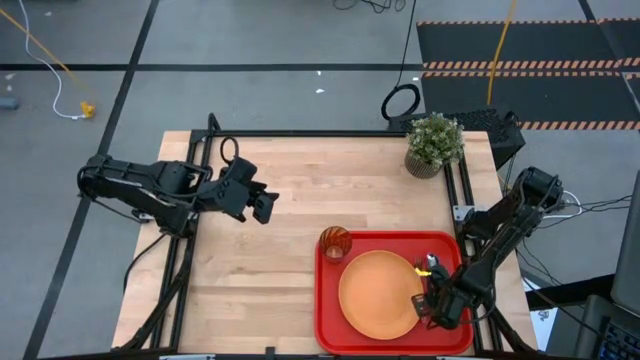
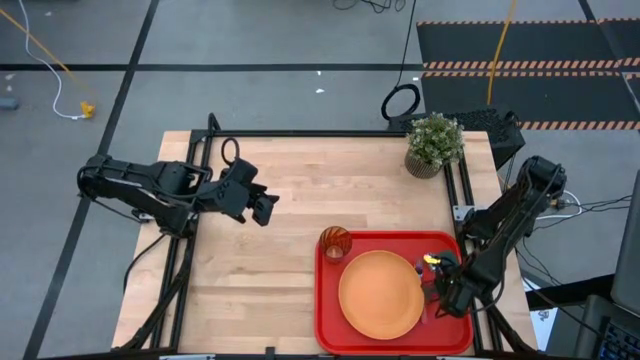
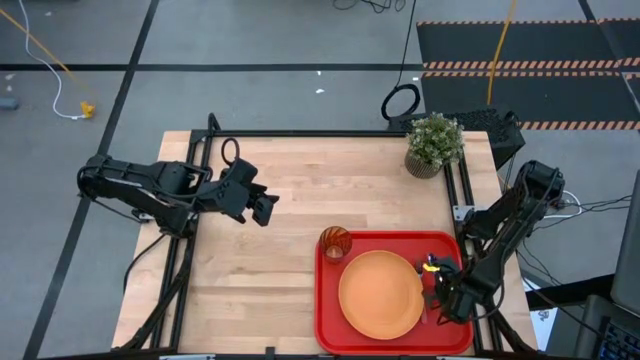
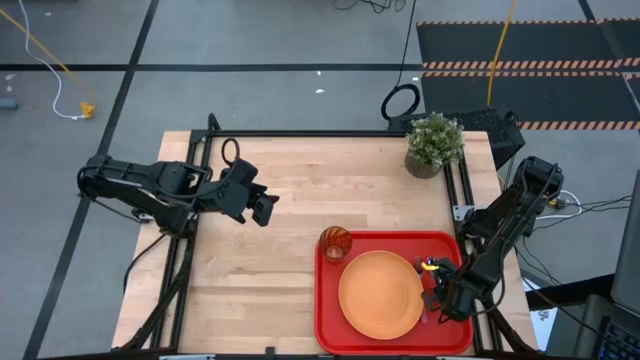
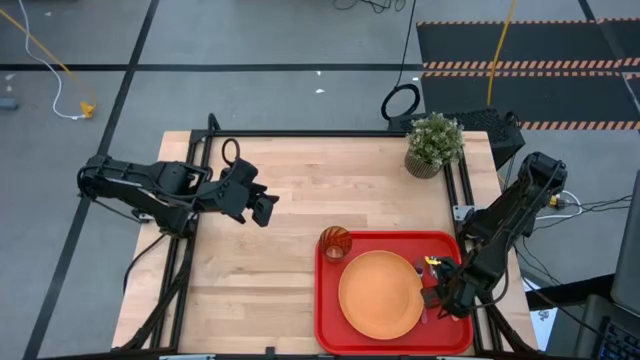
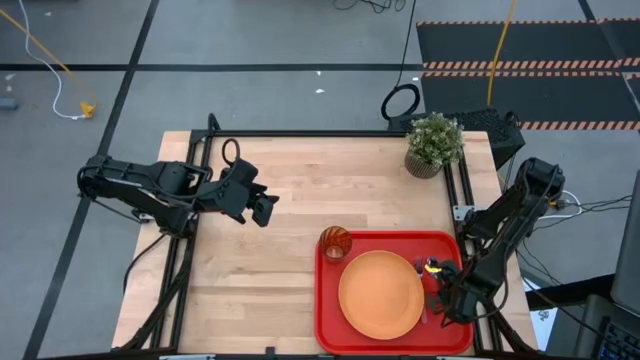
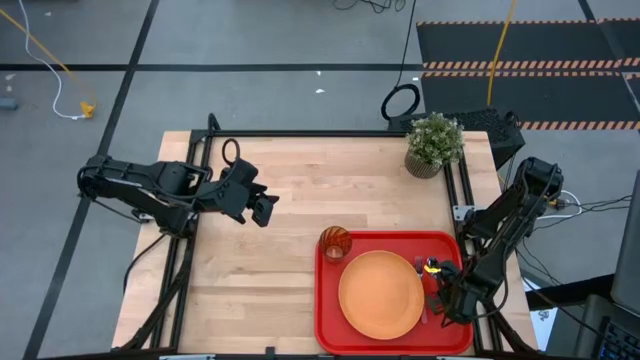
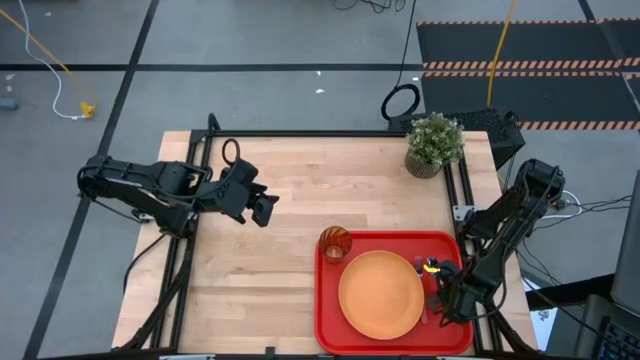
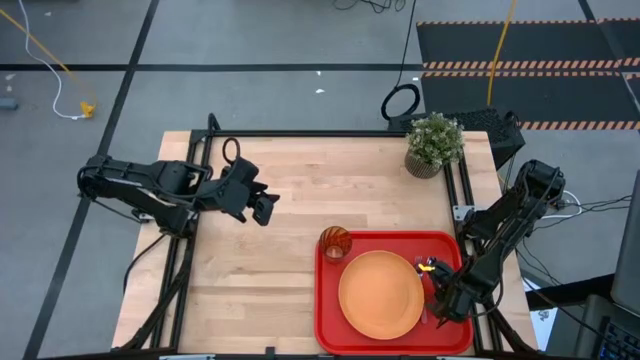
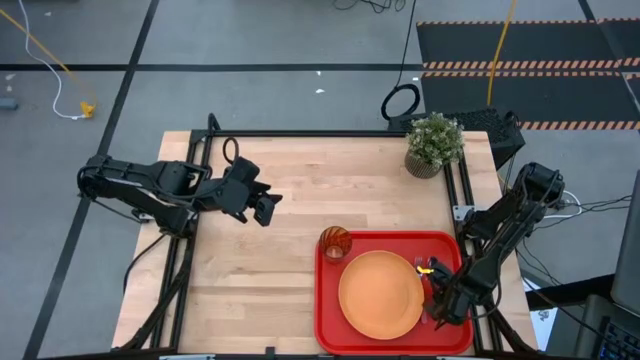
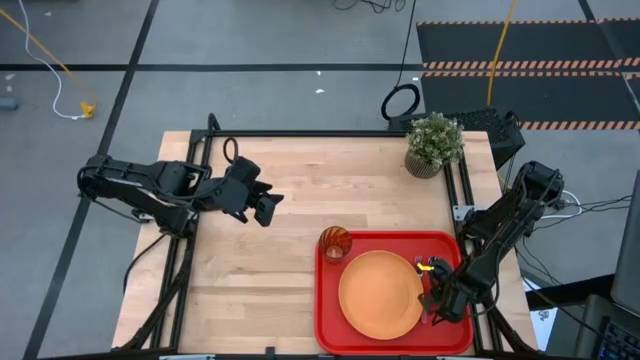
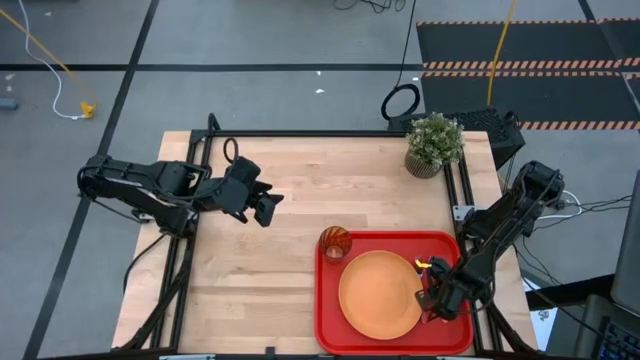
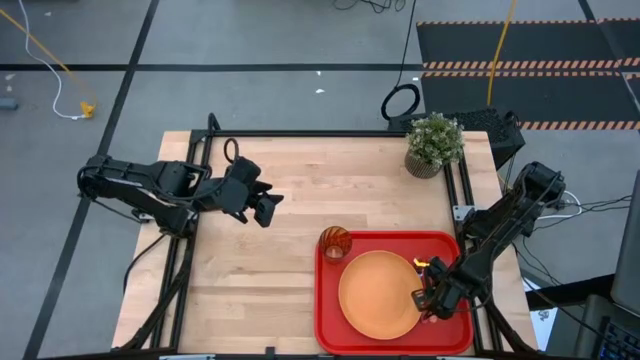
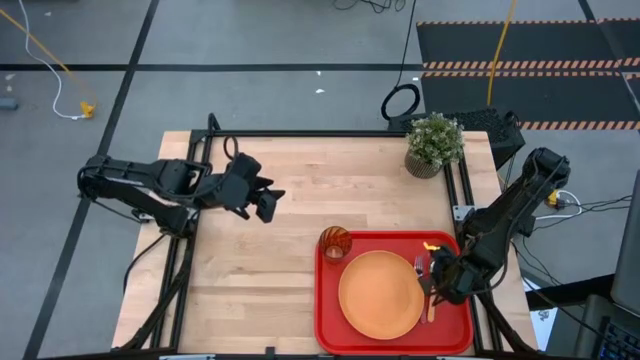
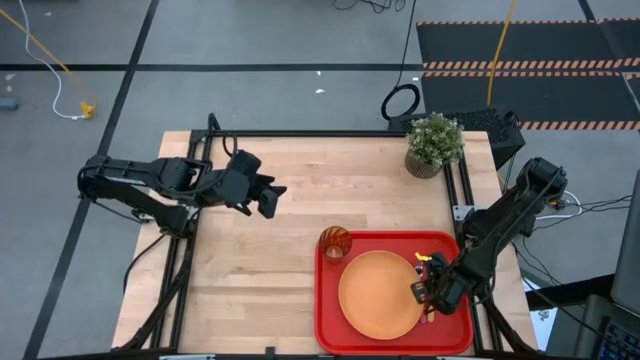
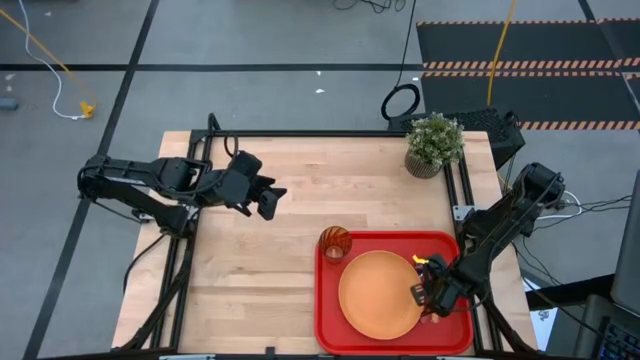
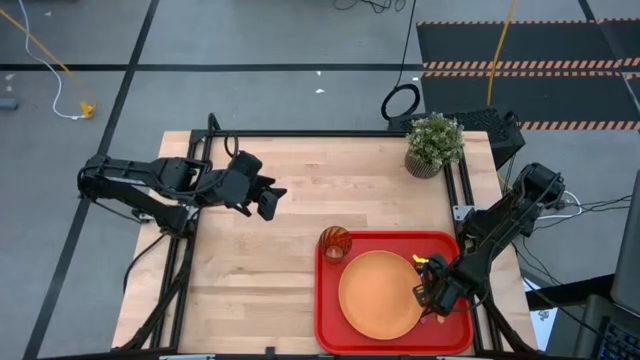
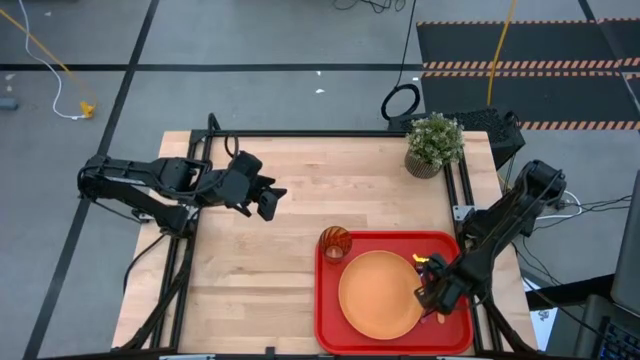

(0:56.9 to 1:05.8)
Task: Pick and place plate/cup/fork/spoon on tray
Put the yellow spoon on the red tray to the right of the red fork

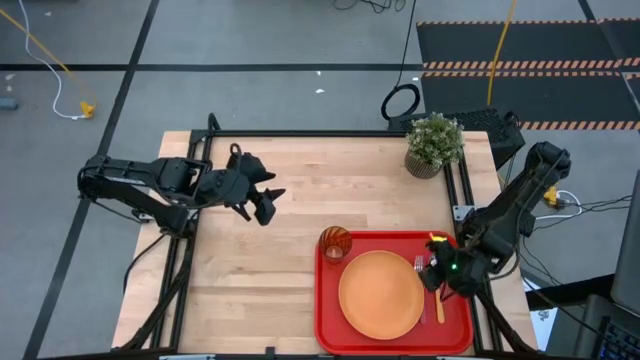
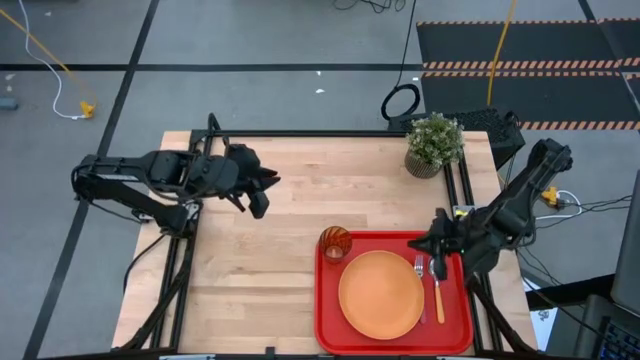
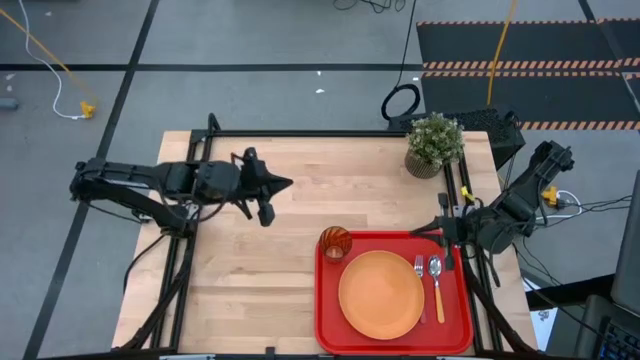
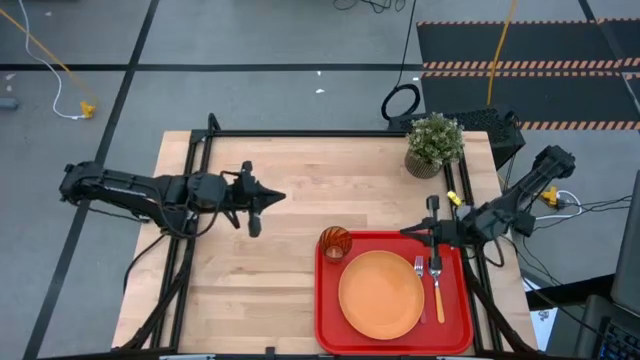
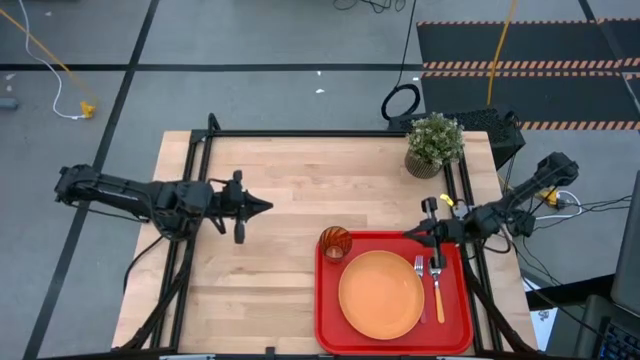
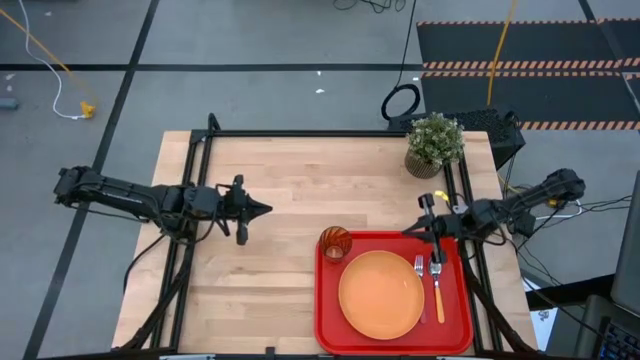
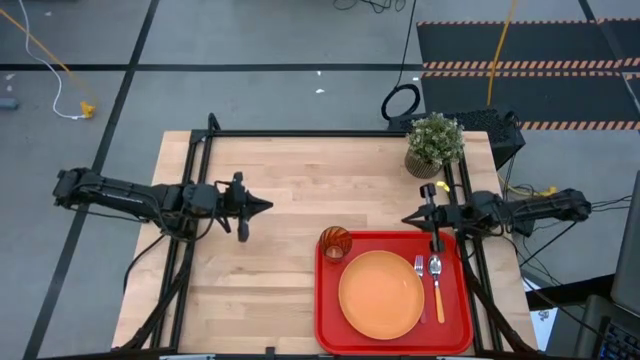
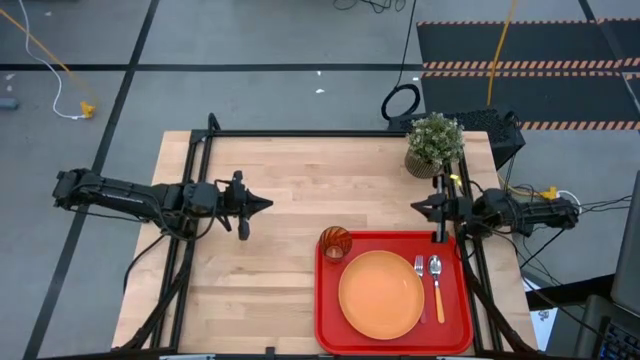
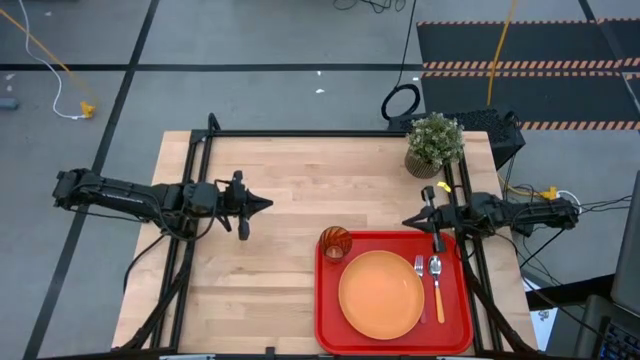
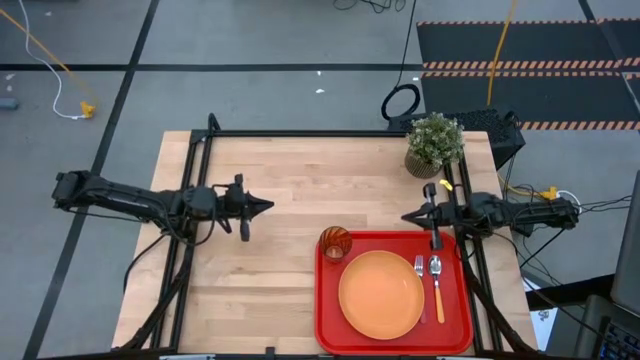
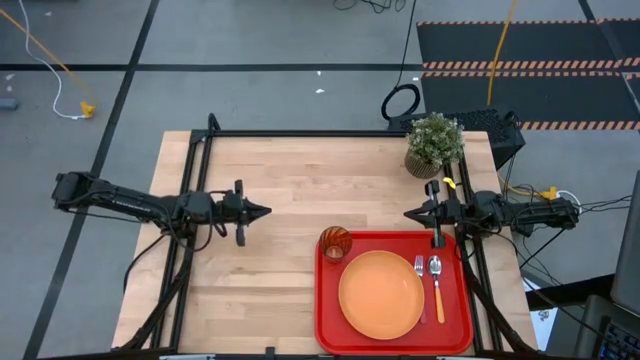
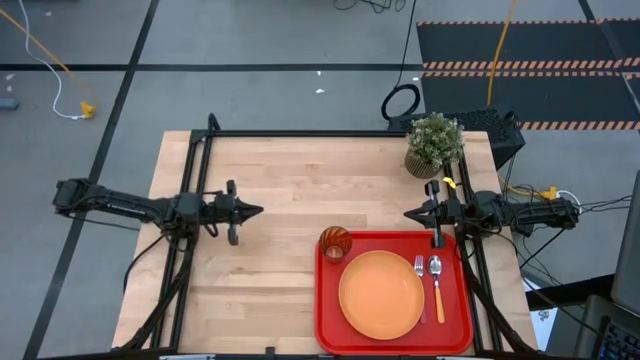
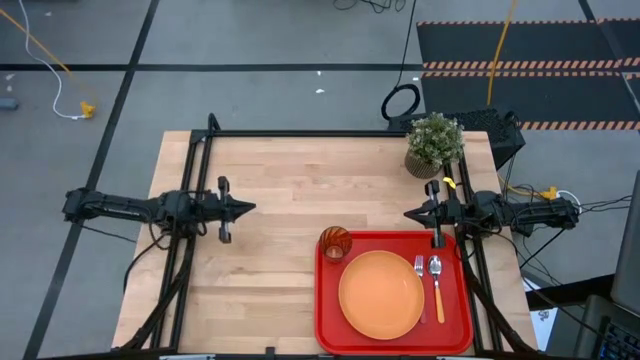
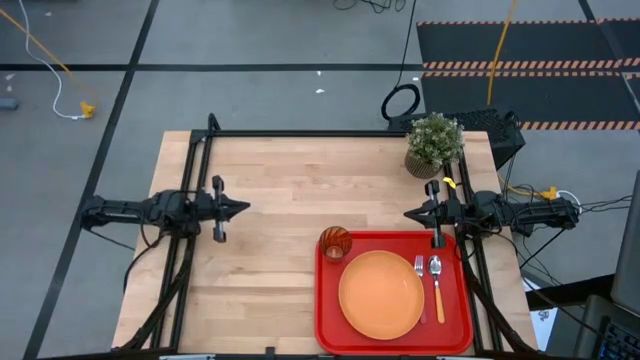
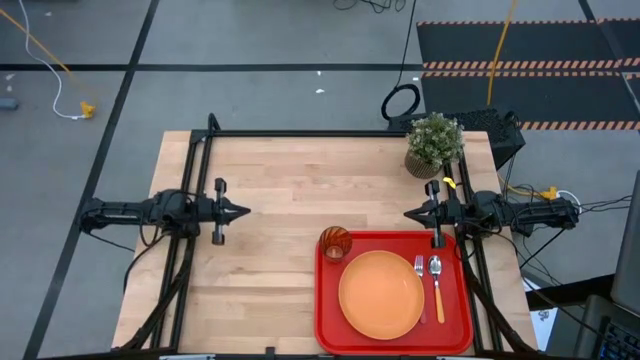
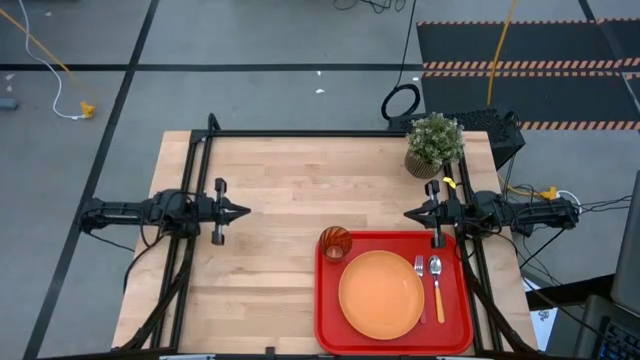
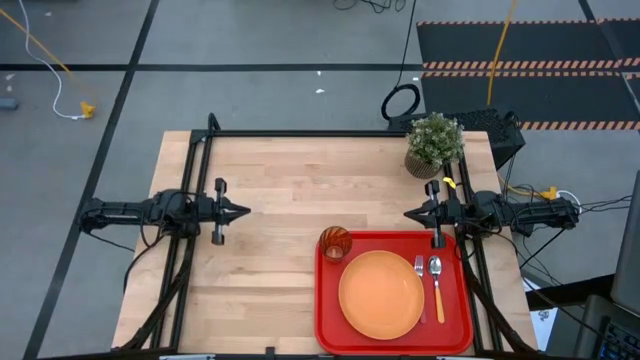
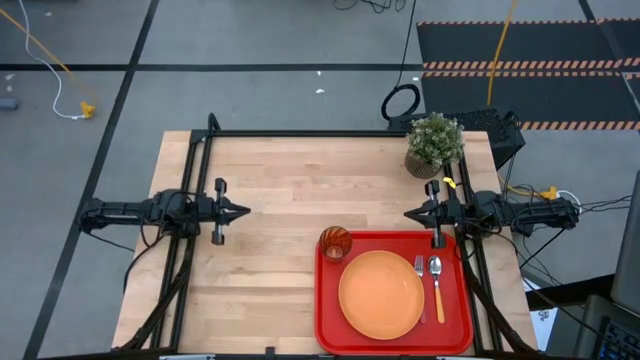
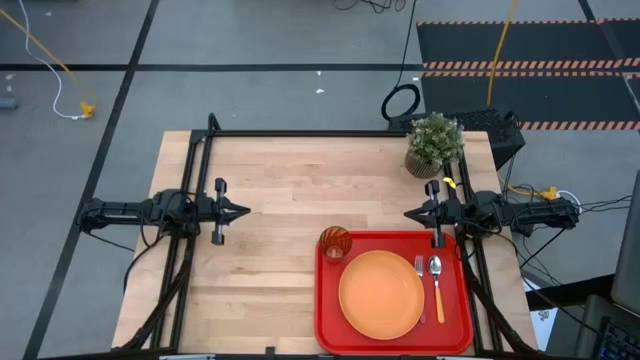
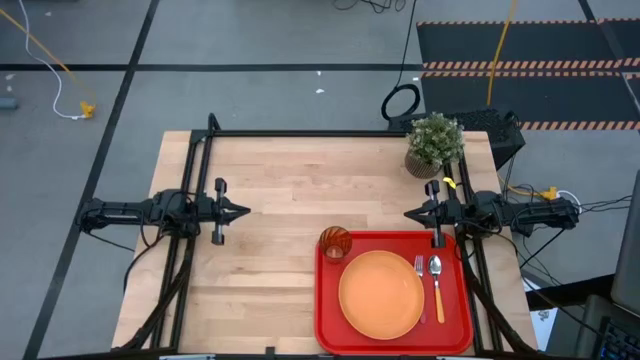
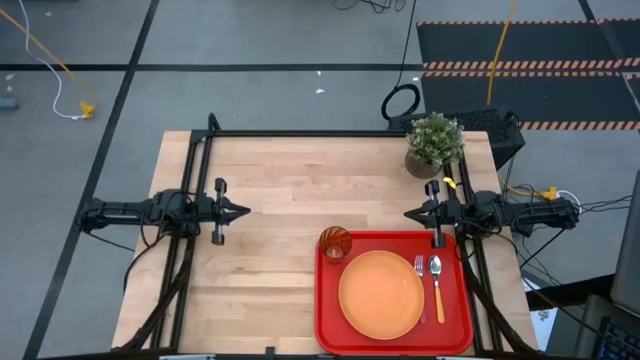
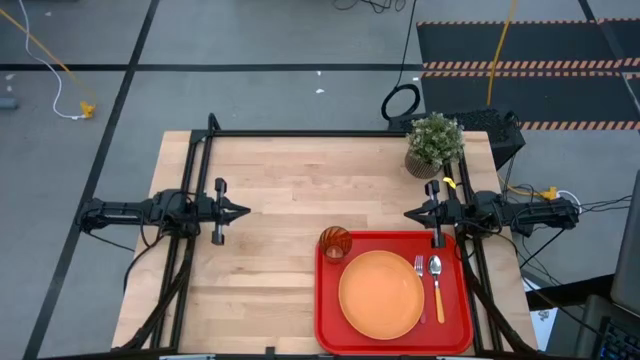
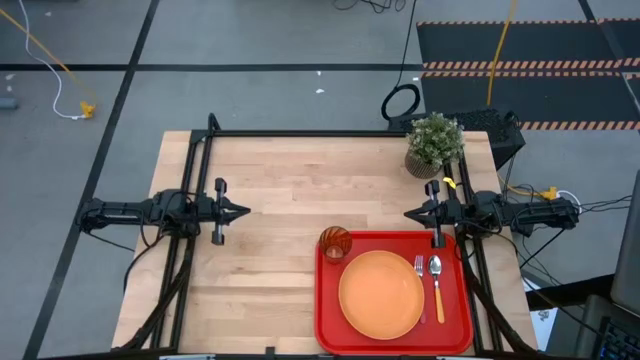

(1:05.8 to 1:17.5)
Return to Home Position

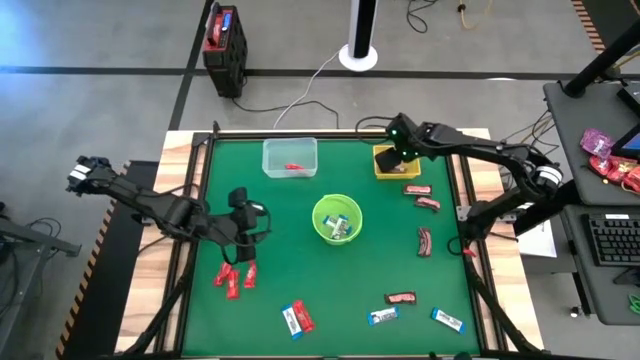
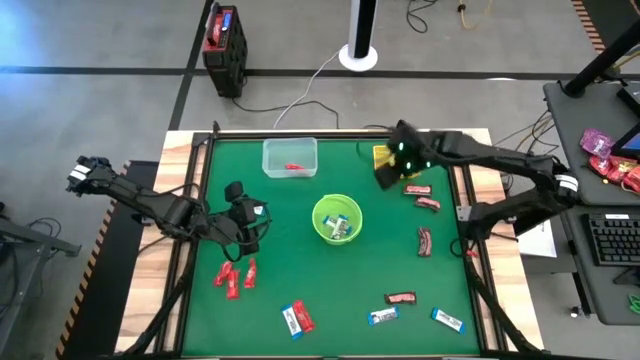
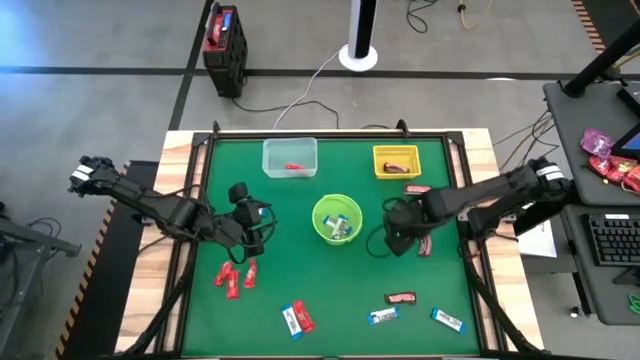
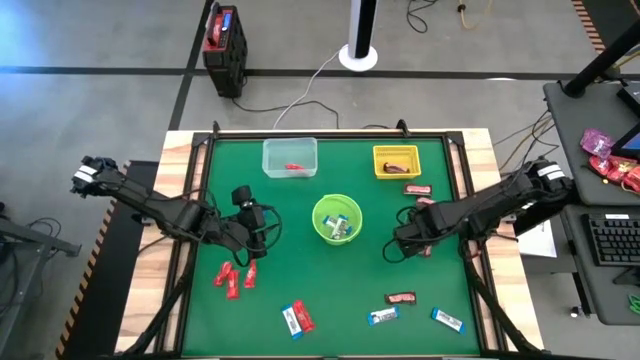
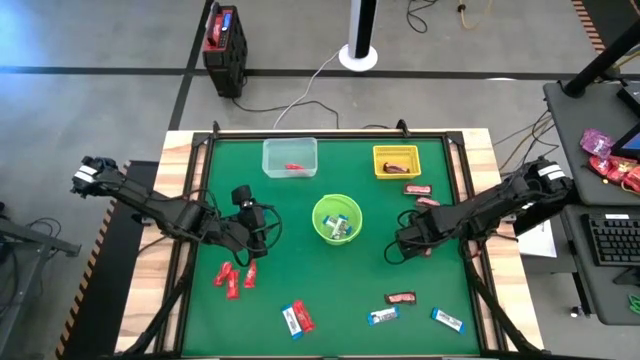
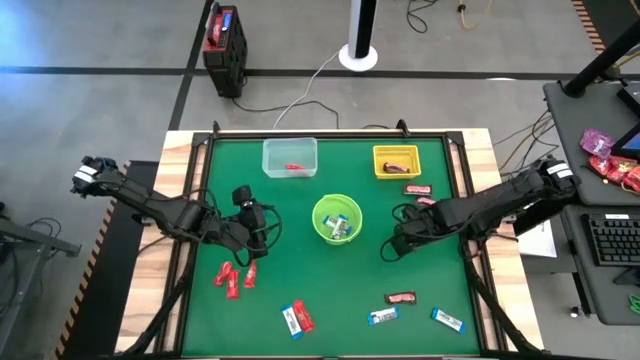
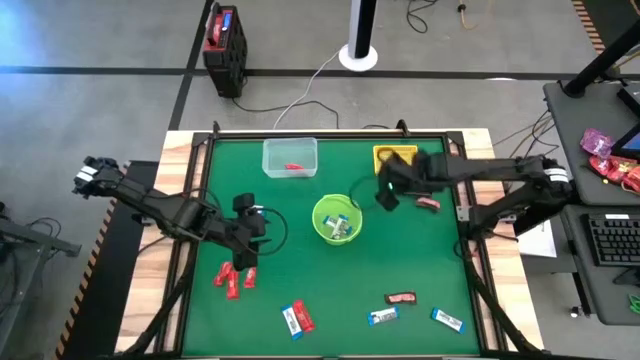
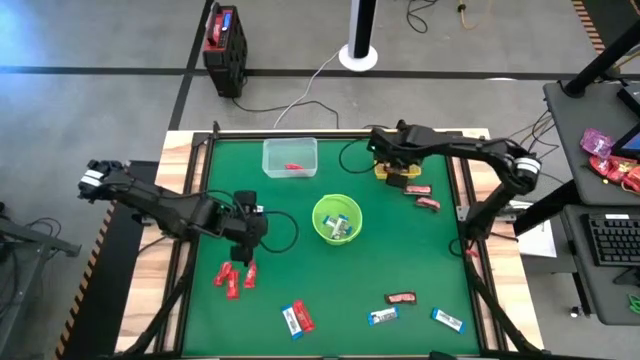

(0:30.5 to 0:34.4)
Task: Sort candy by brand, put in halloween buckets
Put the brown chocolate into the yellow bin
